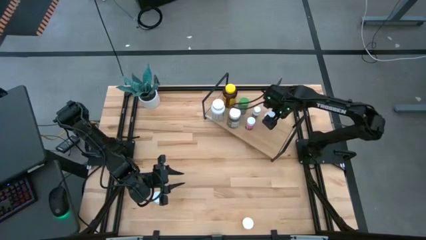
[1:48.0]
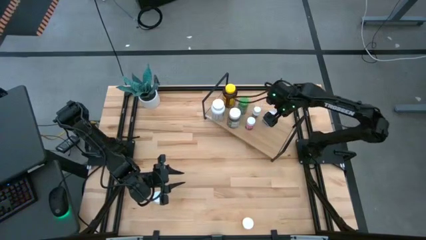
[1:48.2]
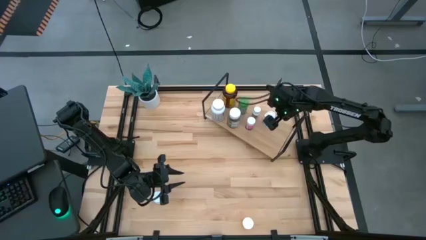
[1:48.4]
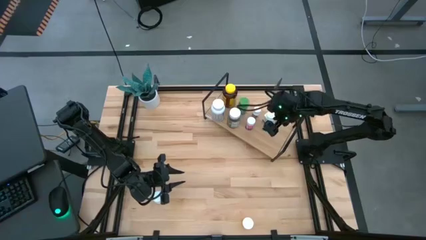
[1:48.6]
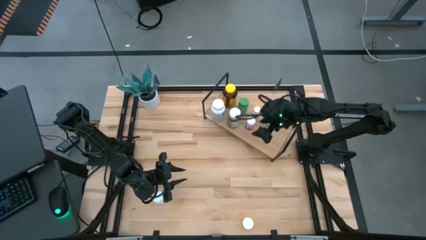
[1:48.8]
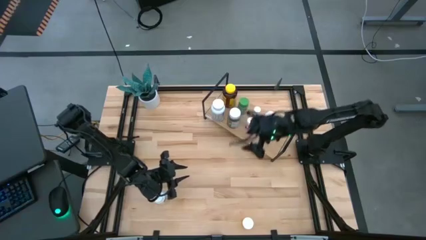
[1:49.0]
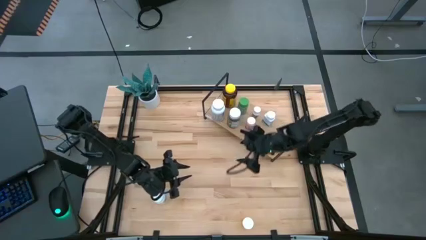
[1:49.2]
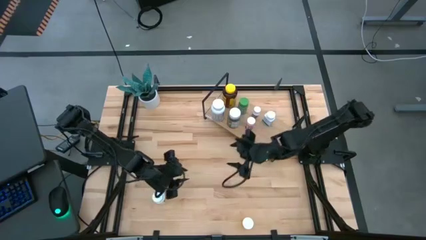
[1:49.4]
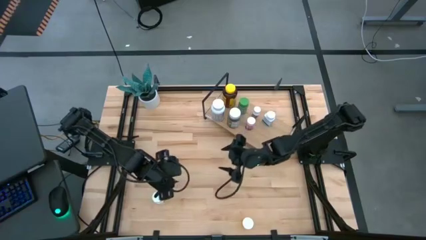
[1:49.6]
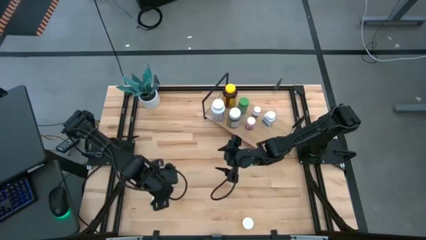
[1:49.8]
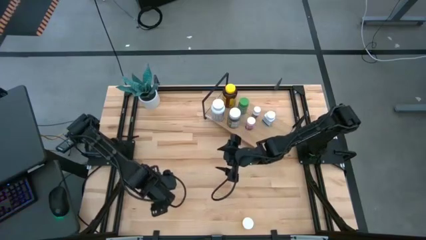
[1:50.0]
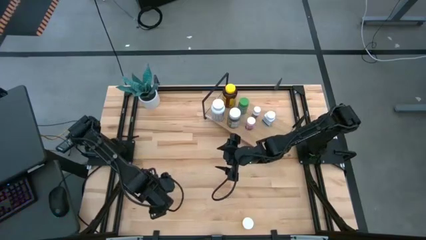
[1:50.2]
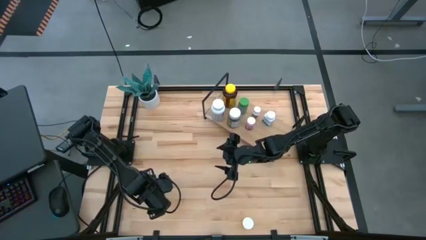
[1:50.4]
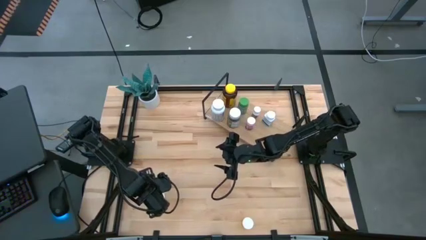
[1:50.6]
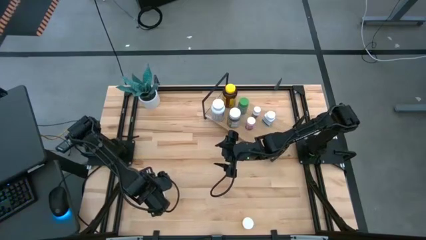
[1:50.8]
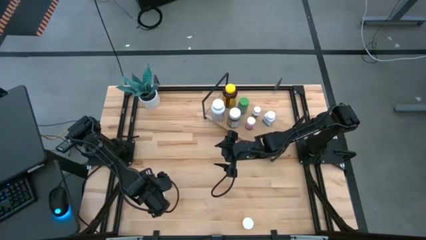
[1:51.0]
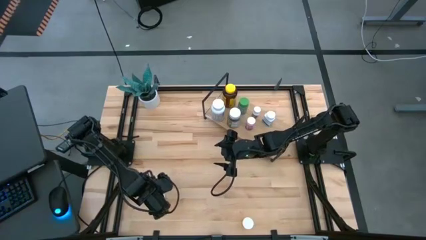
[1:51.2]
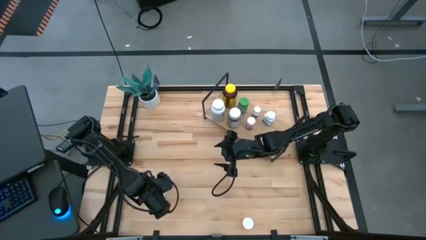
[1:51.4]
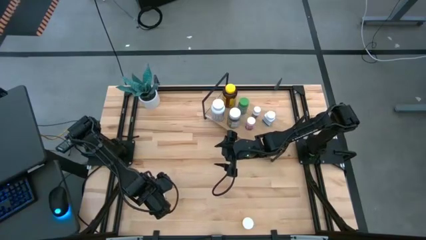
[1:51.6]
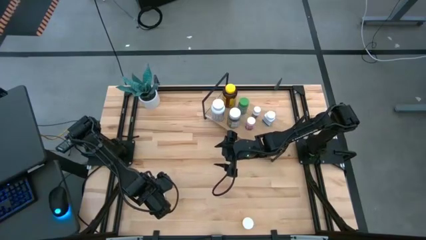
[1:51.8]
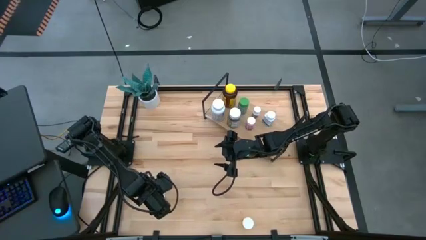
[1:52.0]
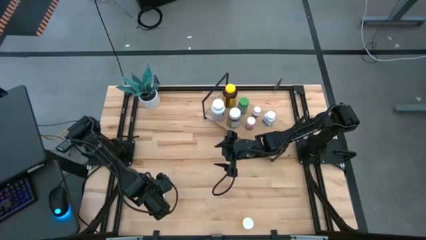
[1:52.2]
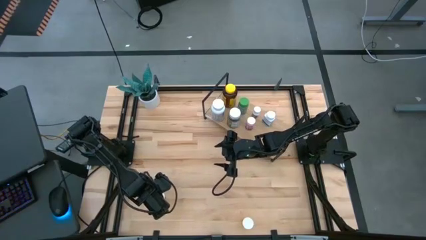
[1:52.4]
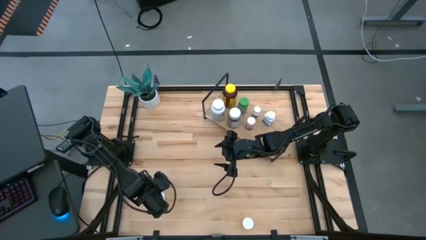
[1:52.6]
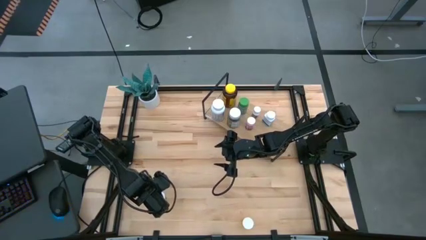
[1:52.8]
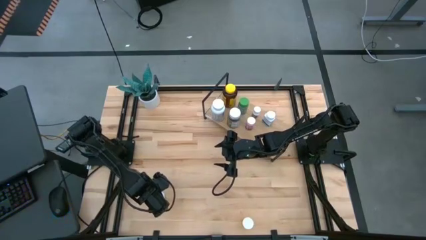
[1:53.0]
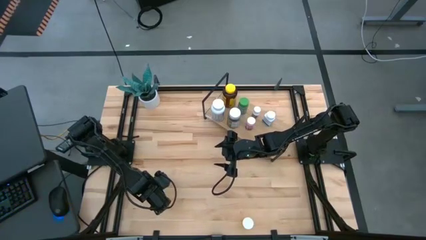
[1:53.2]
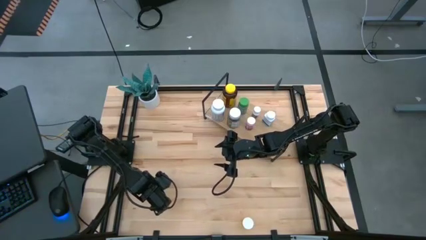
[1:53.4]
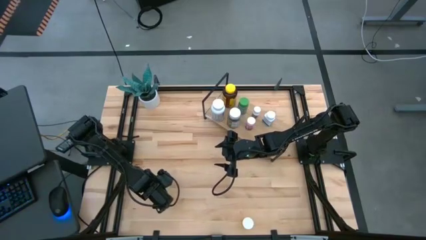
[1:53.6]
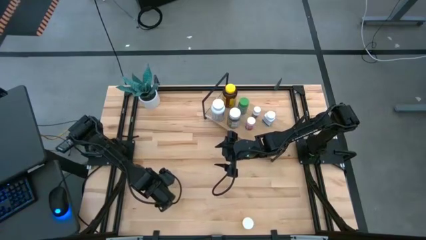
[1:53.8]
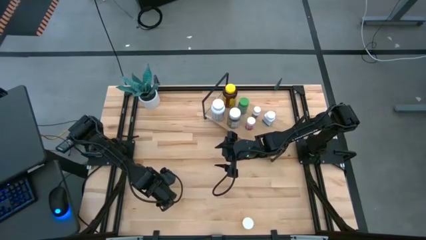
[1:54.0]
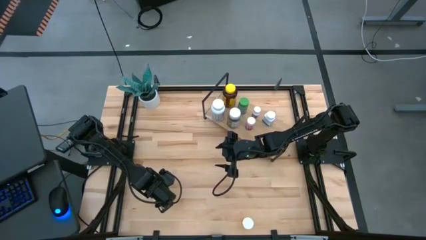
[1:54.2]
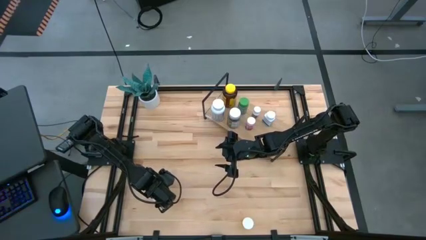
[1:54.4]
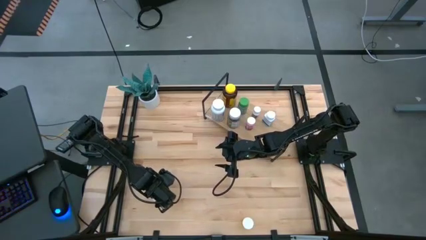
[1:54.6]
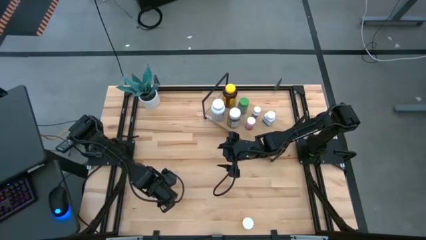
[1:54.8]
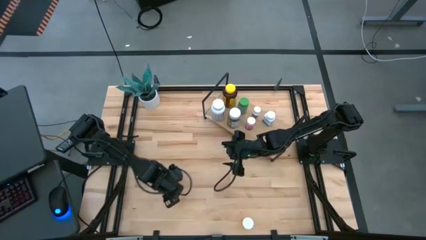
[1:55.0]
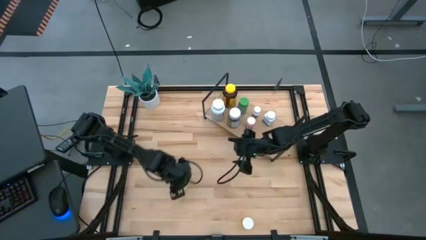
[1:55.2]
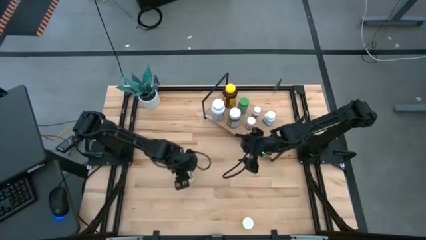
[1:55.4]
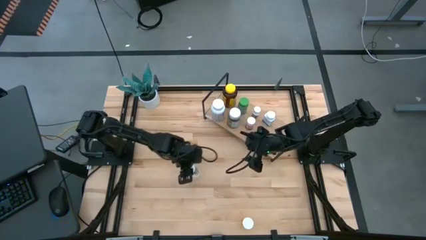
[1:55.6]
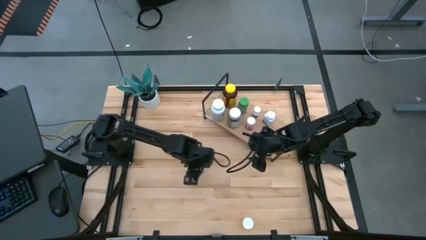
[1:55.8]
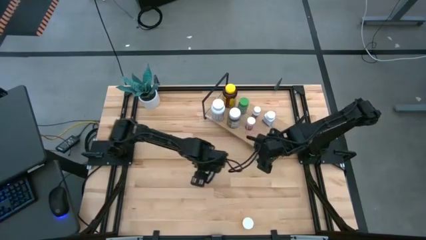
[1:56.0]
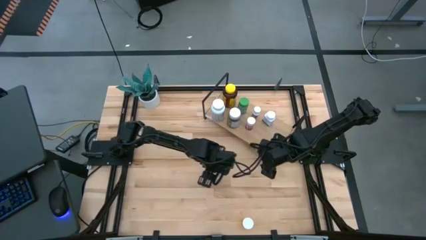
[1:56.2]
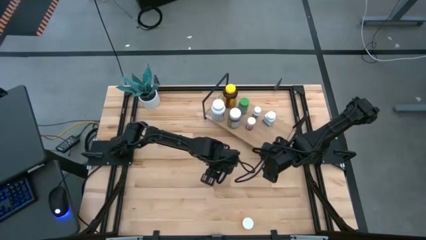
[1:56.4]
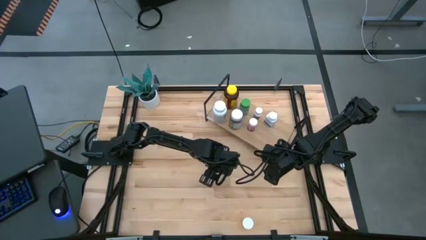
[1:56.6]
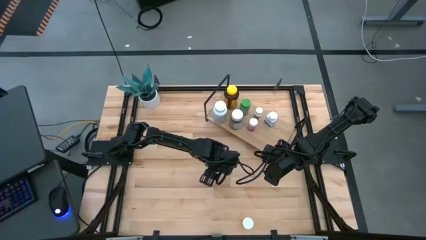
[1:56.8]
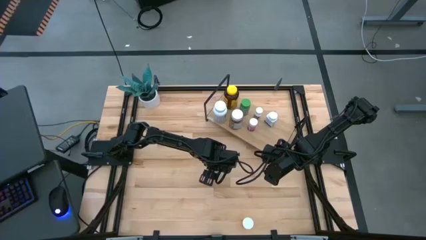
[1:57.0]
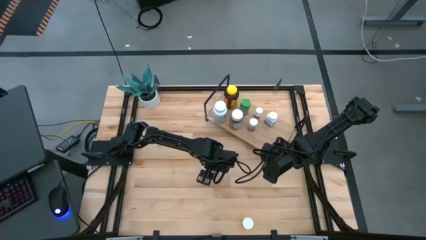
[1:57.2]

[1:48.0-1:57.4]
Task: Pick and place medicine bottles onto shelf by color
Put the white and green pill bottle on the shelf

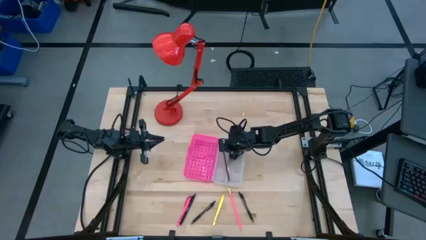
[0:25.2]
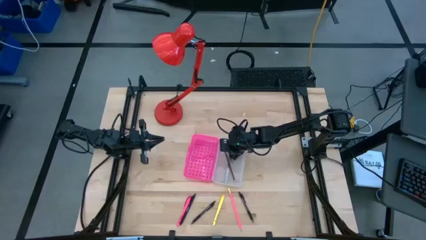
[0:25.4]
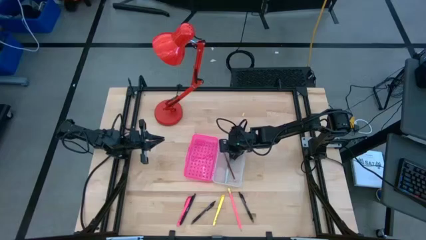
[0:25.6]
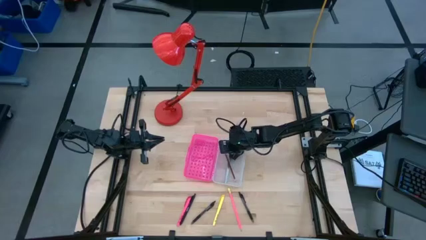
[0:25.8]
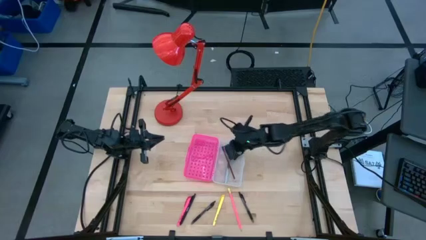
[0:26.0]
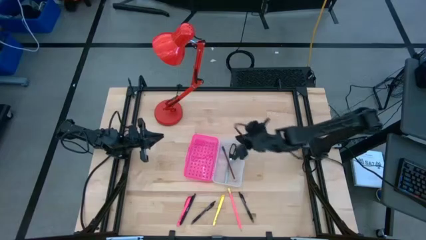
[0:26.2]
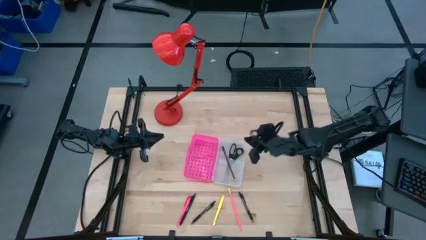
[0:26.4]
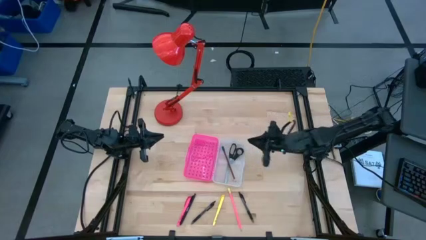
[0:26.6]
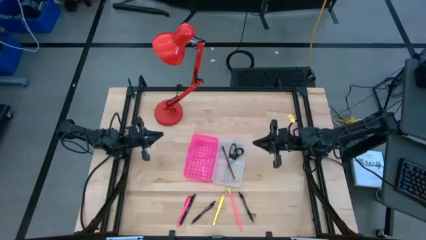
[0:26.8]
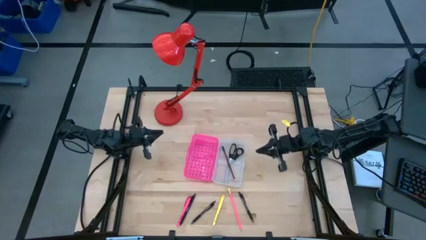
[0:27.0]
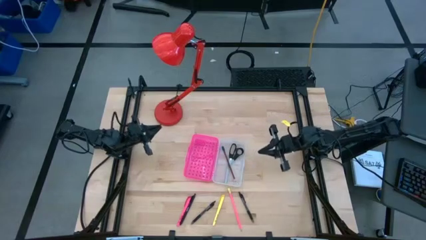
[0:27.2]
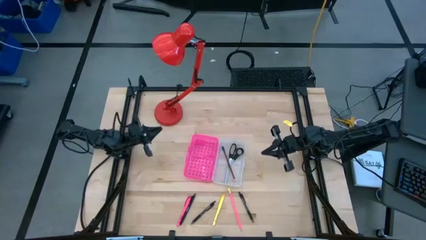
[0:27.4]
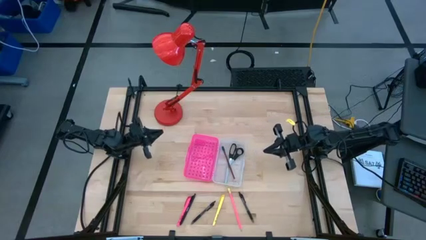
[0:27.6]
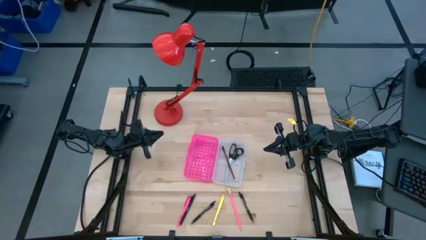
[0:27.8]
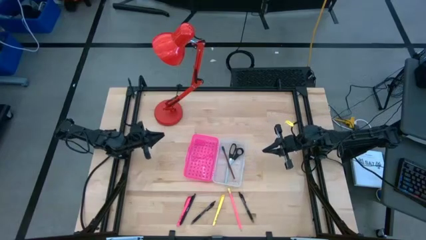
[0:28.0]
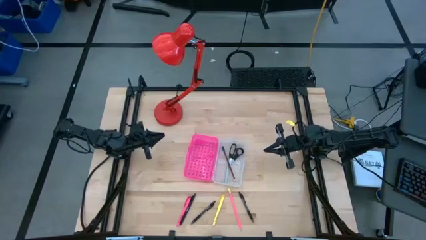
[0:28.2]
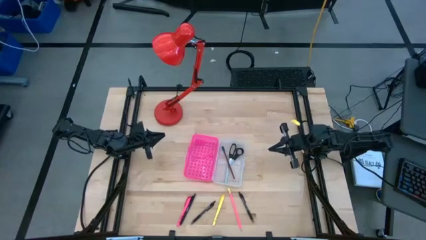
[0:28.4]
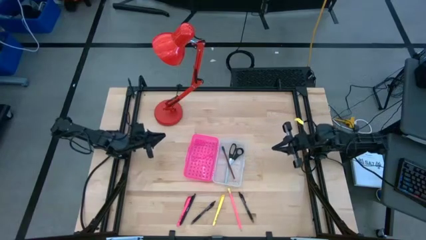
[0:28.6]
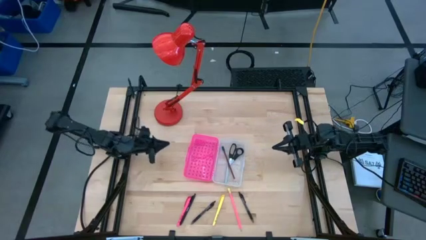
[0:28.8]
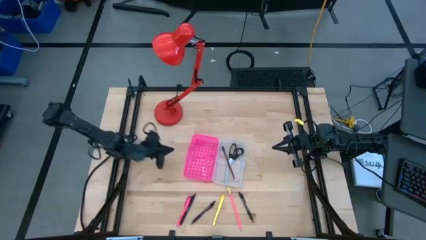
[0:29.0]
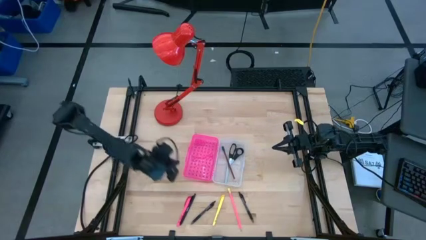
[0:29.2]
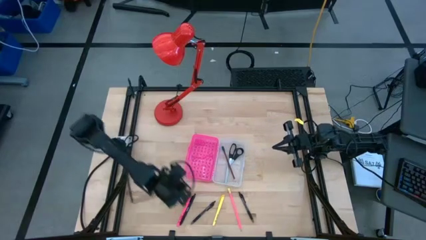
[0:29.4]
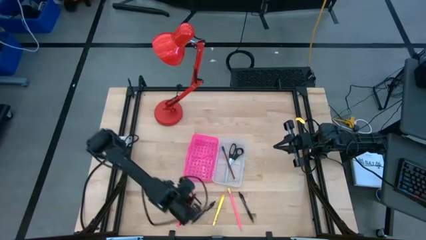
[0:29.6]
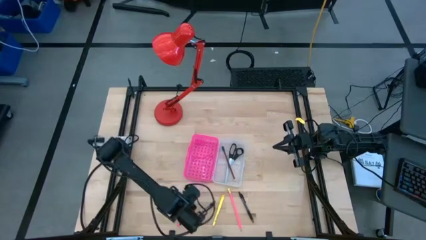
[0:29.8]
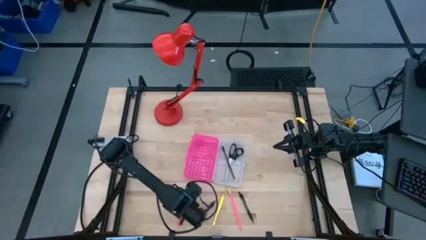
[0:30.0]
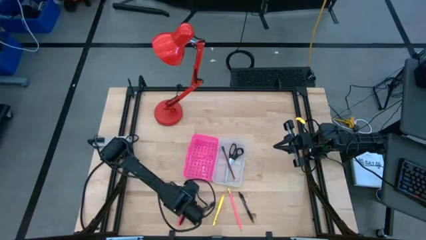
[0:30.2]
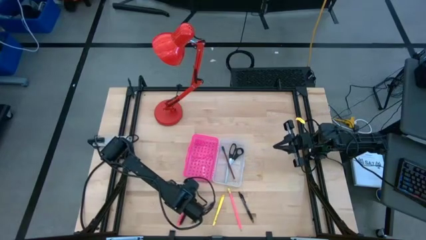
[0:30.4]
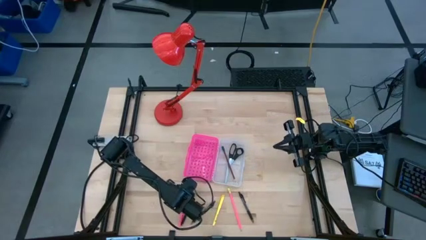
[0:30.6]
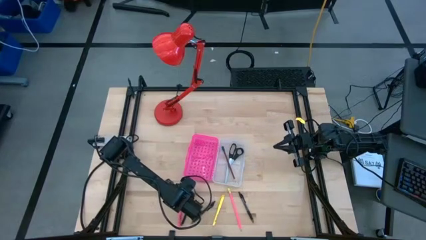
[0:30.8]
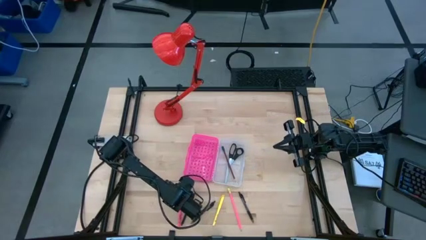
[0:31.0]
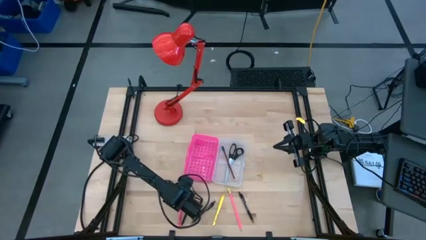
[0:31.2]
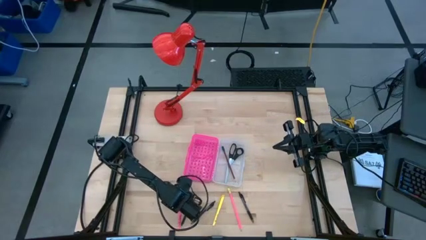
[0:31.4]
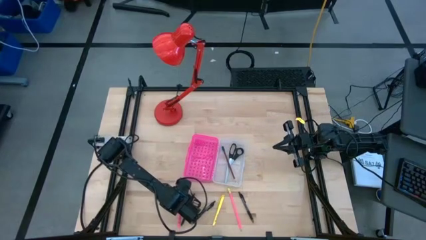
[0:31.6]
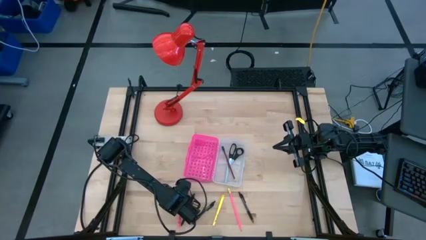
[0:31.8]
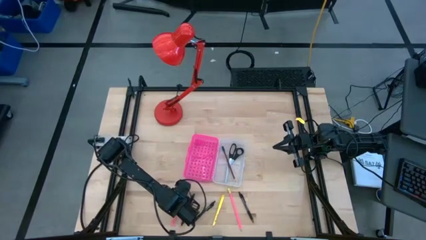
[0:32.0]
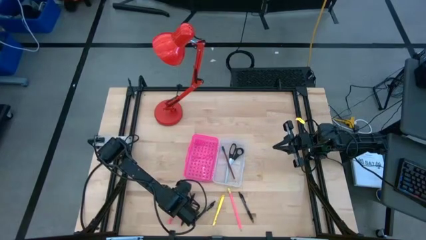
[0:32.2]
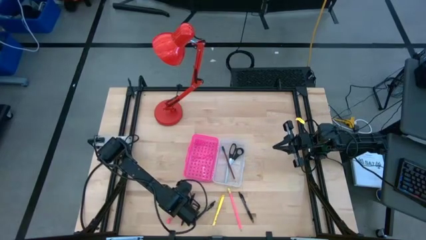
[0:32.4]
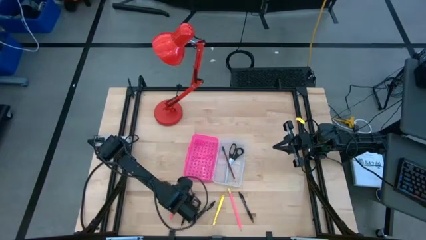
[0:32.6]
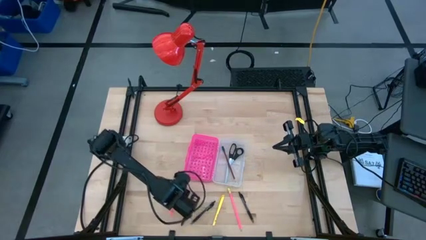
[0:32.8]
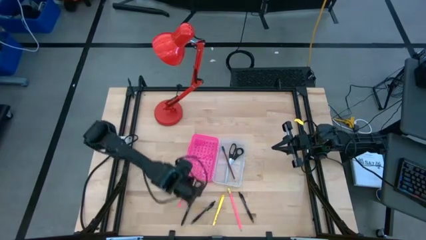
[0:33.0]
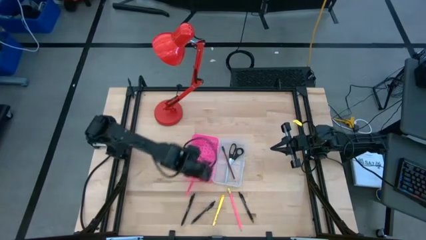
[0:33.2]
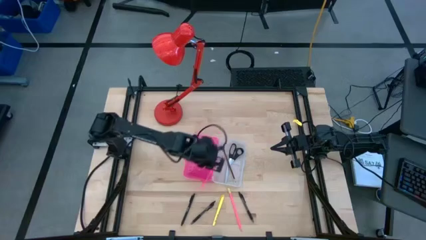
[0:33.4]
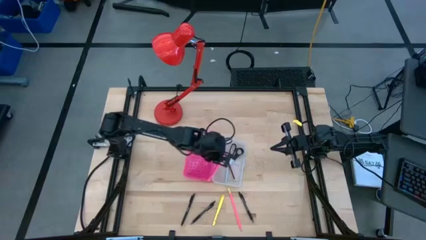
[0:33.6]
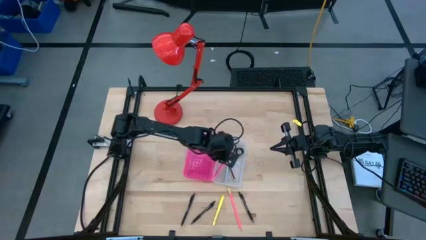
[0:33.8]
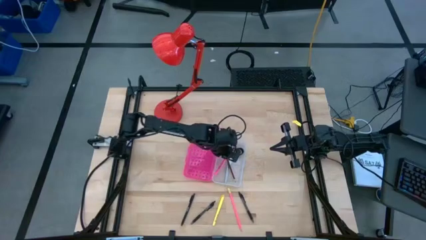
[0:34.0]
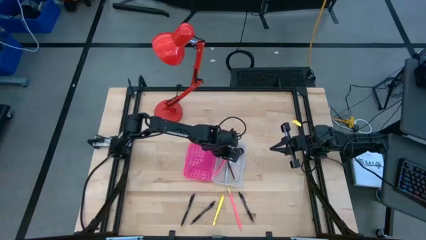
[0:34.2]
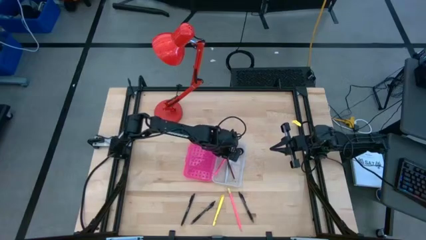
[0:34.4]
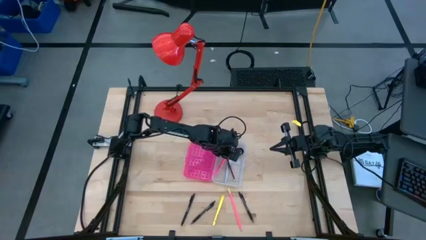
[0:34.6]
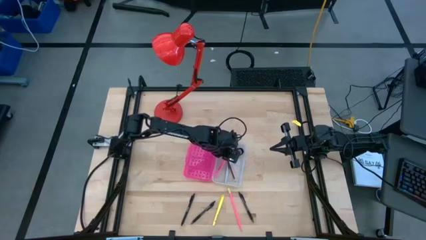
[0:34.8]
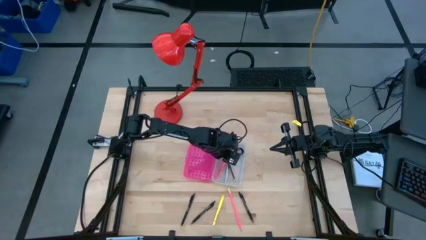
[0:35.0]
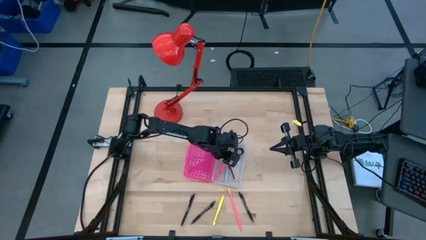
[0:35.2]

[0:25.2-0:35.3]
Task: Pick & place school supplies into a supply box
Put the pink pen in the pink box
